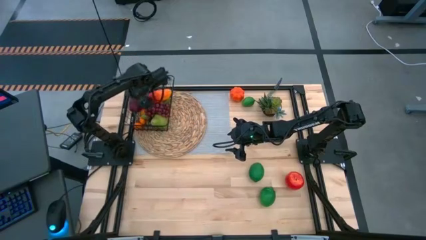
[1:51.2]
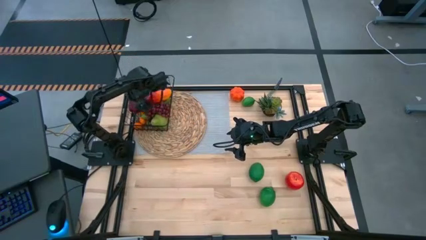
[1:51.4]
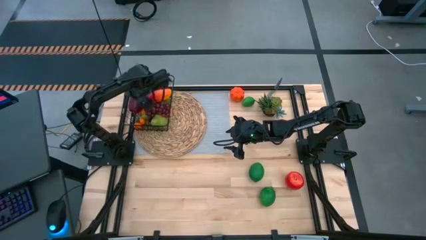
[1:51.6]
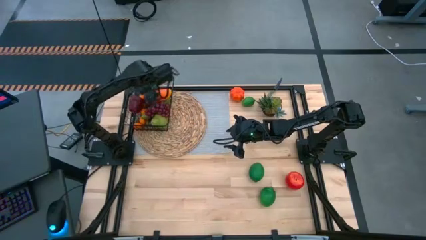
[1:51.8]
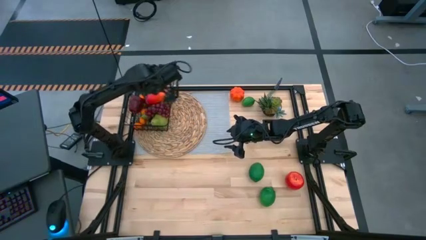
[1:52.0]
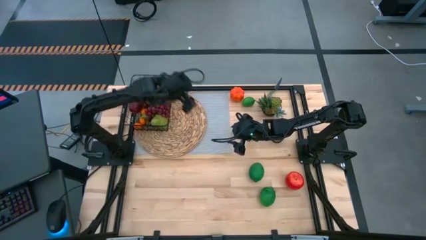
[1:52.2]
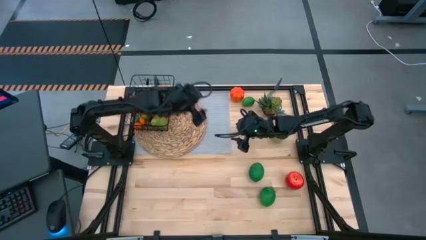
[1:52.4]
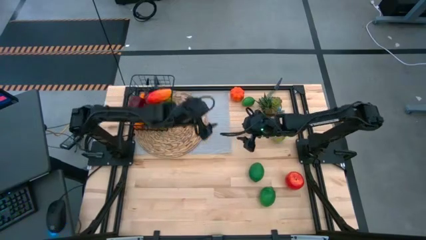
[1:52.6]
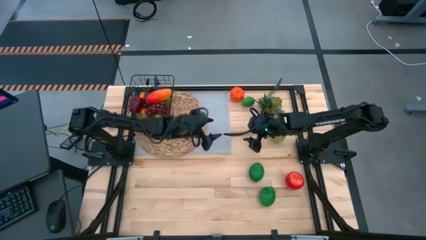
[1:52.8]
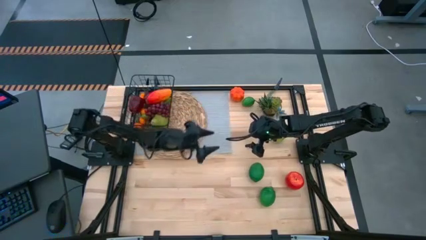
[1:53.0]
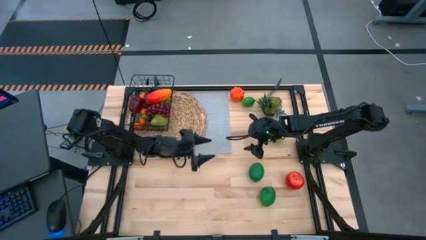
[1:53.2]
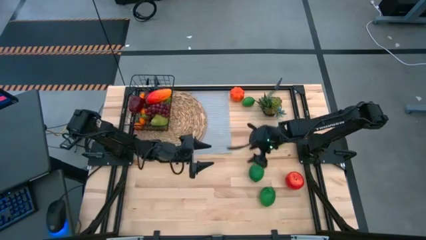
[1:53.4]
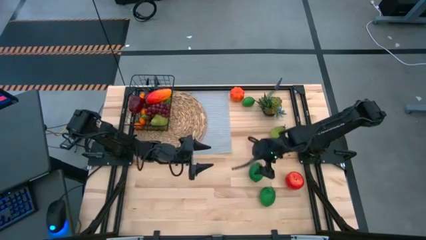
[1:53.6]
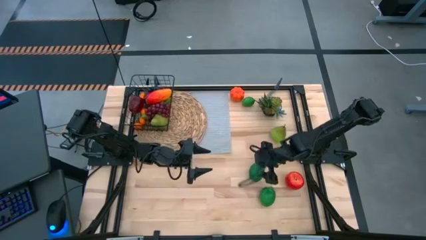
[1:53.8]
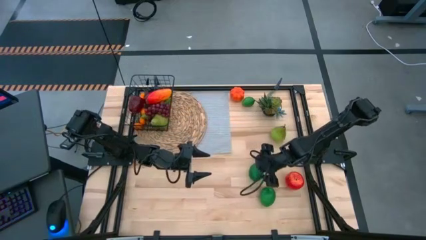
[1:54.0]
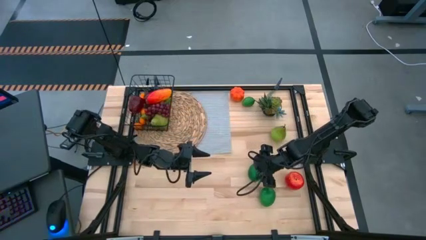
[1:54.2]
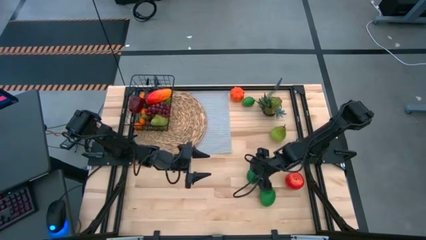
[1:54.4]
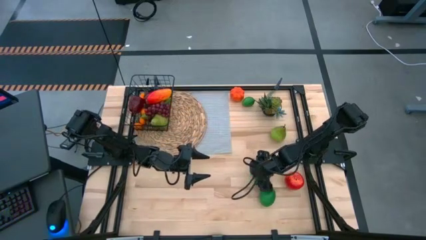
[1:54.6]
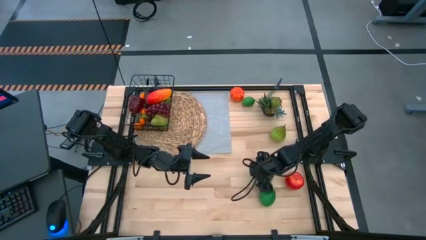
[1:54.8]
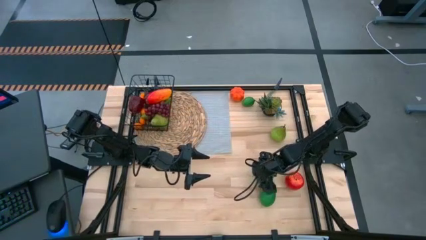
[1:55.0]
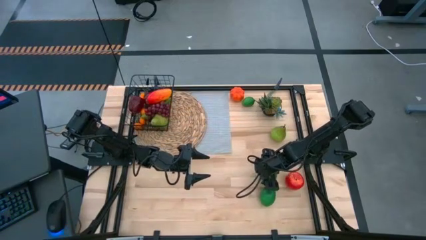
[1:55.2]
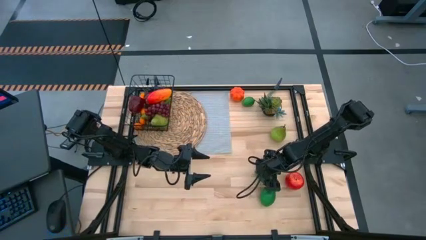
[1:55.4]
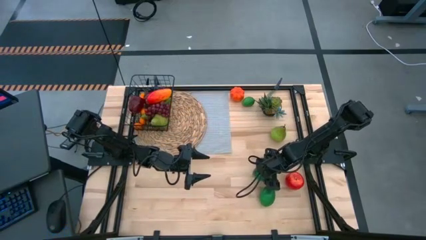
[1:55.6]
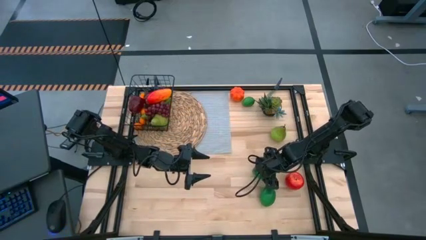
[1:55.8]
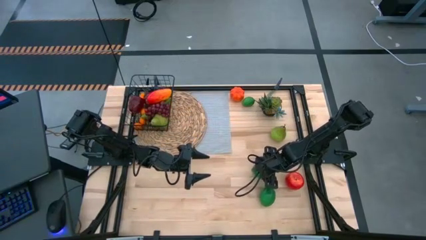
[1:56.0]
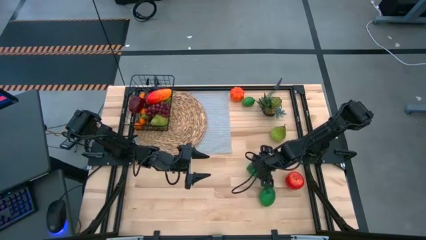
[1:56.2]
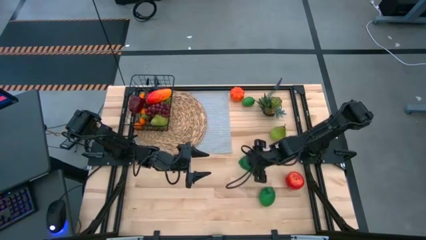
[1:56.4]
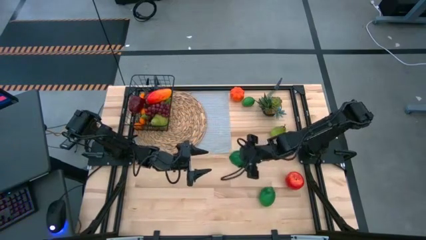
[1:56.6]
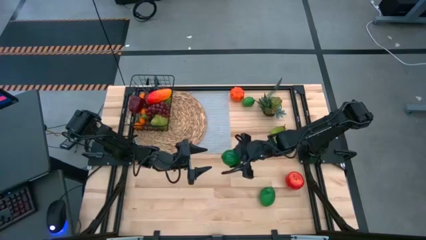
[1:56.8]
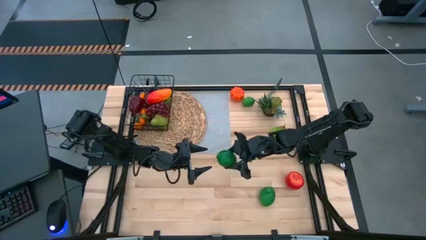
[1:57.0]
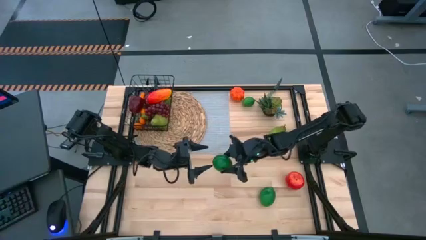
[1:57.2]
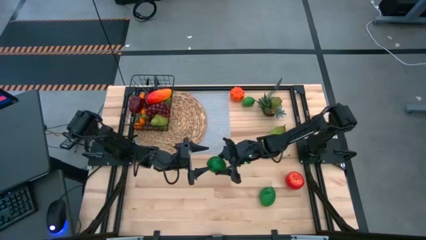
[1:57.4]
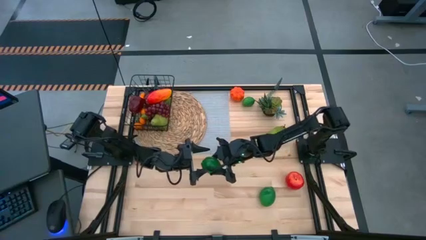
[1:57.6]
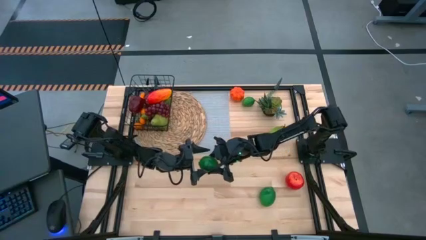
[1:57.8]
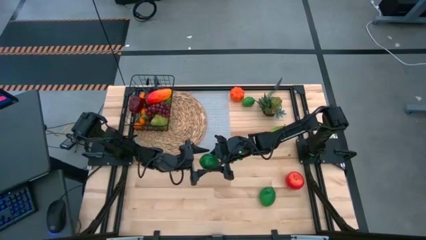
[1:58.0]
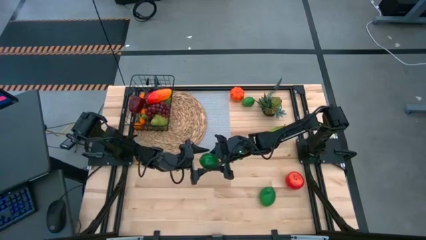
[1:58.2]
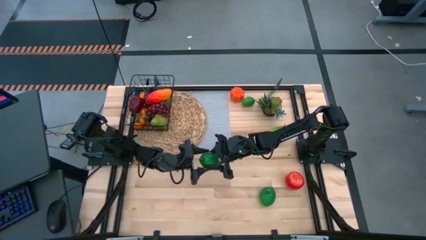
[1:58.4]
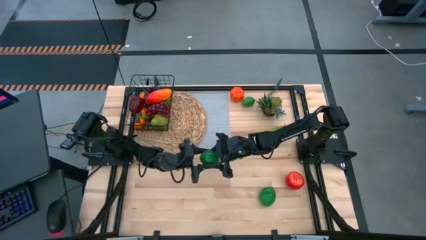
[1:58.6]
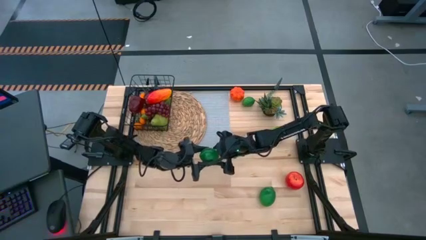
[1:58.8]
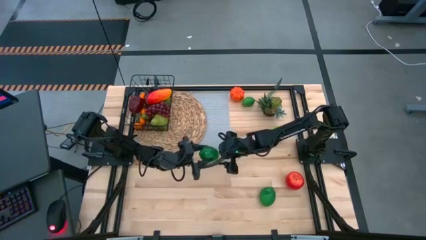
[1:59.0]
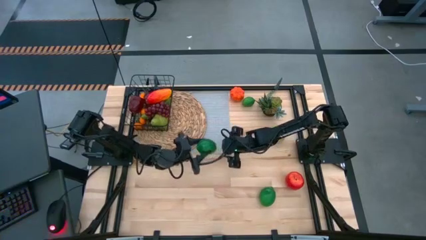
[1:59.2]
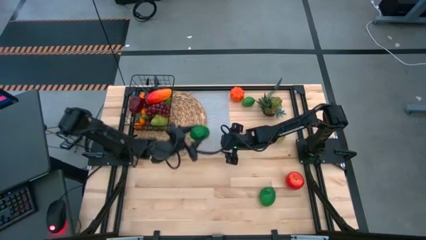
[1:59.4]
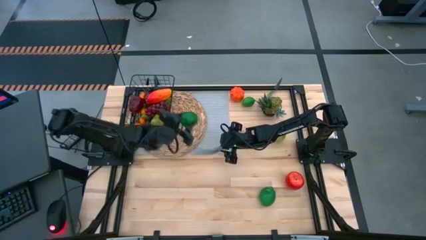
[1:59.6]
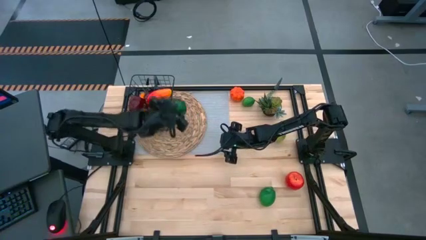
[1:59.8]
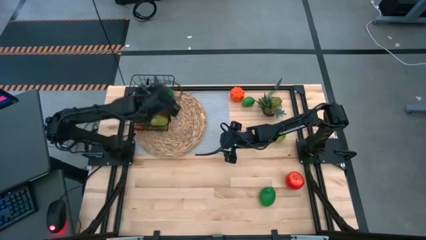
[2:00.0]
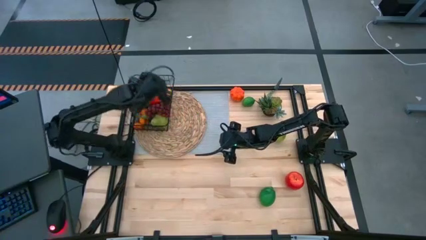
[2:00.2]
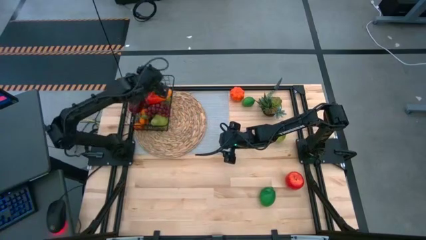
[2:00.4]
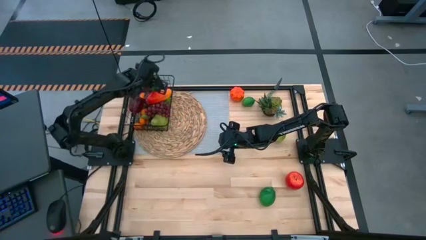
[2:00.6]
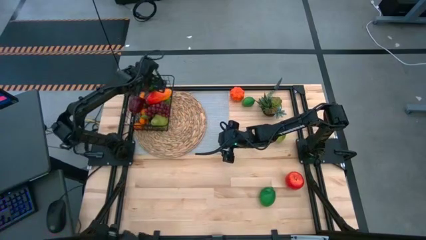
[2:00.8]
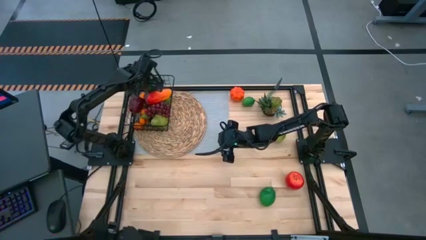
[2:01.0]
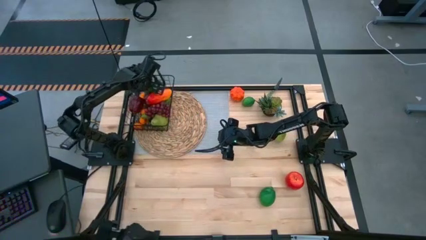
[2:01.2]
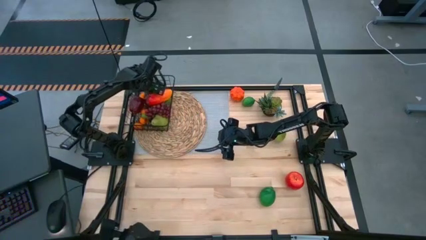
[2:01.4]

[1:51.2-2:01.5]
Task: Build produce basket
Put the middle green lime into the wire basket
